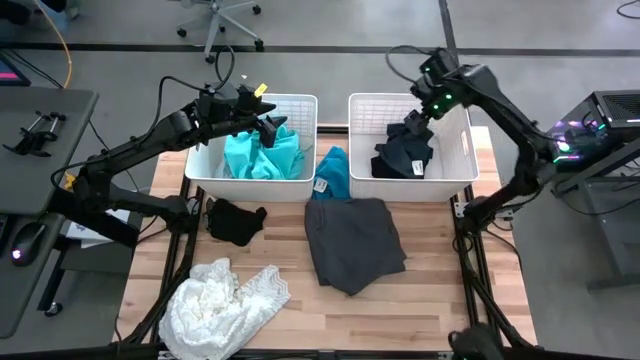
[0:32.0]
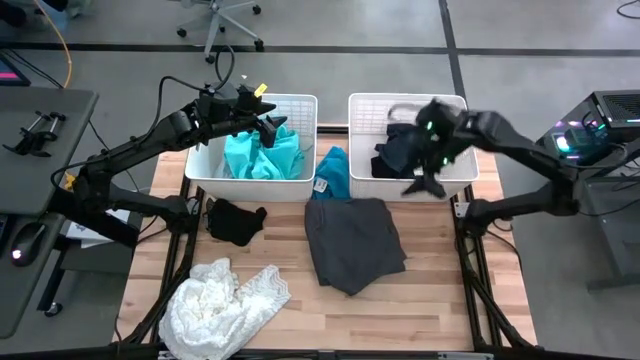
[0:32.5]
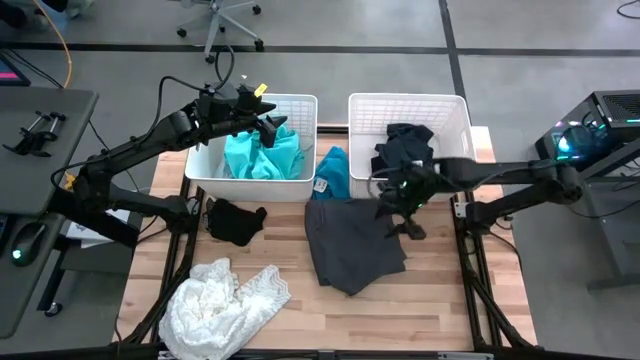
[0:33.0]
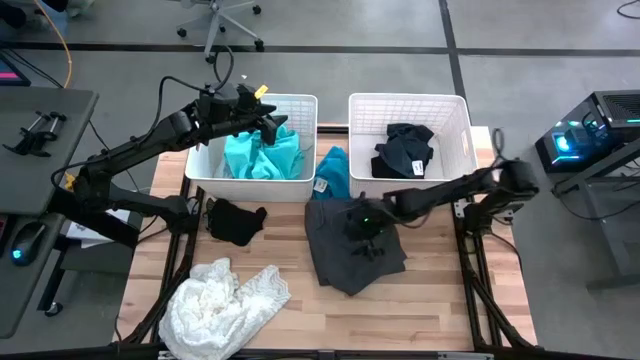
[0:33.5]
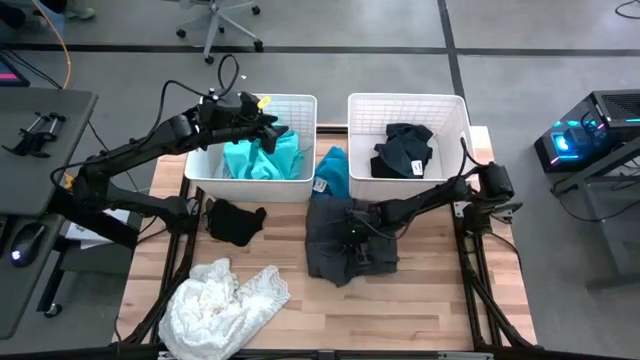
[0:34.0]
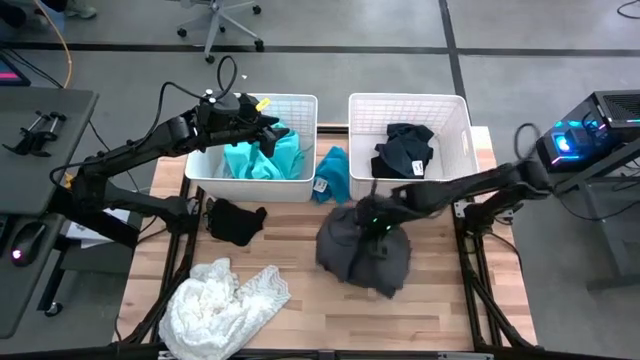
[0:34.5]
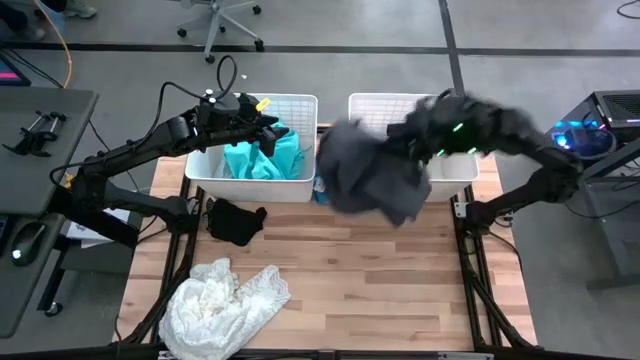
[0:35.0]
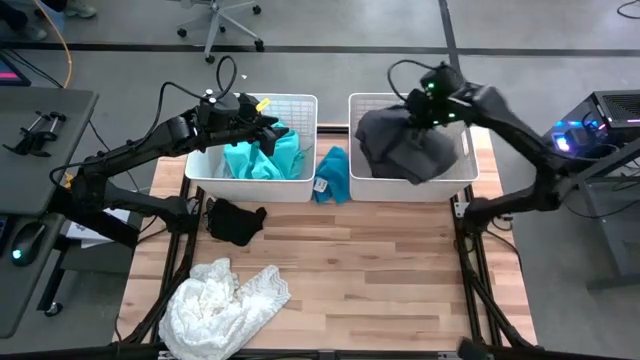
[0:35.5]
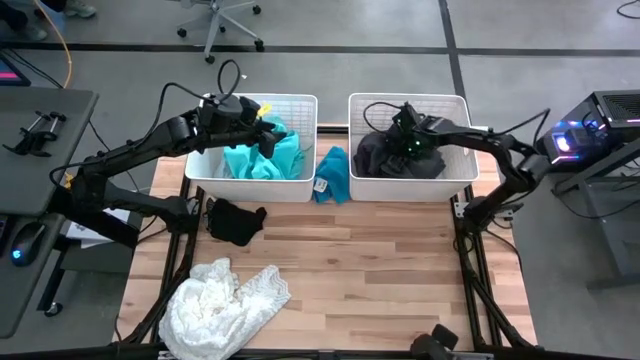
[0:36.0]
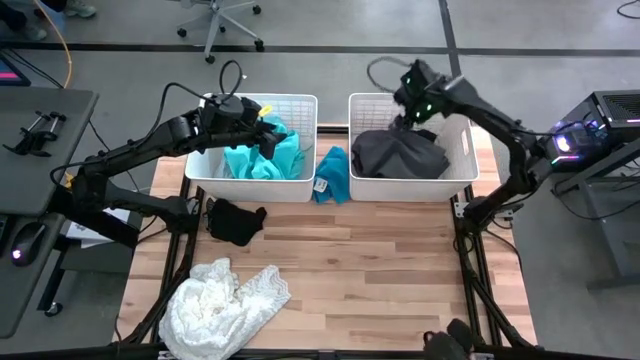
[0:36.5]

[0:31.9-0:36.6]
Task: Sort clothes
Put the gray shorts into the right white bin

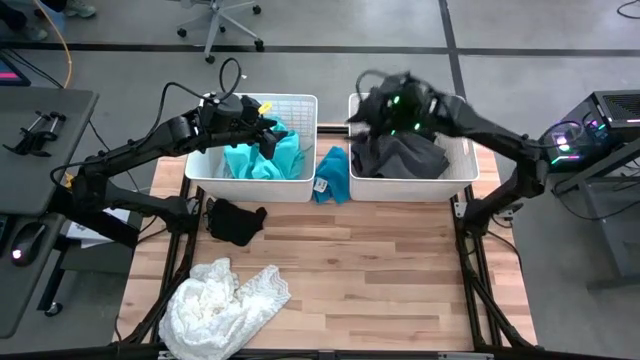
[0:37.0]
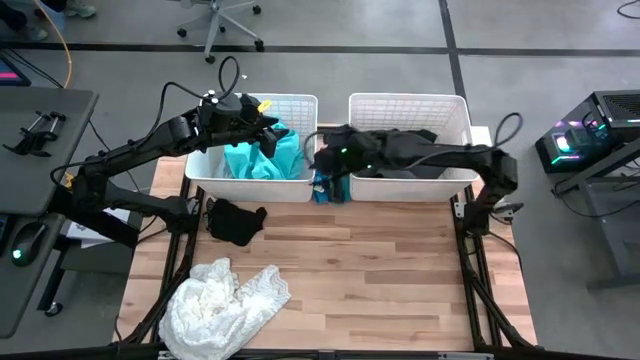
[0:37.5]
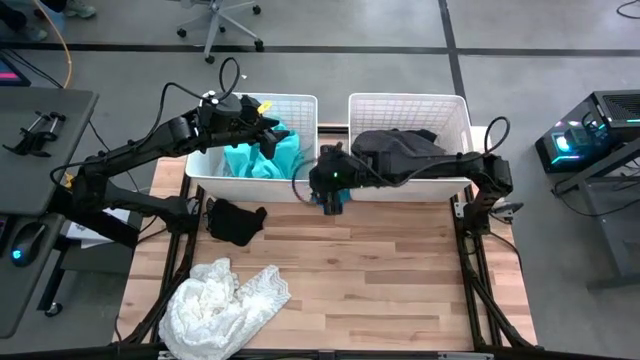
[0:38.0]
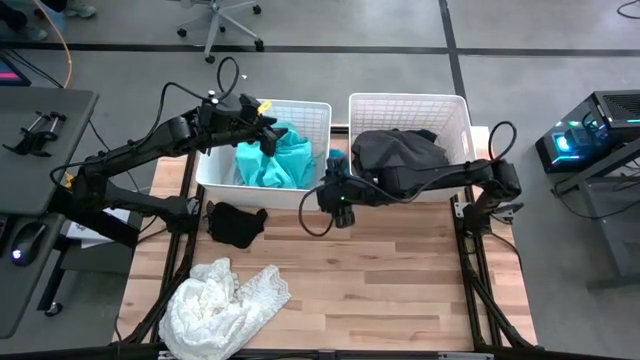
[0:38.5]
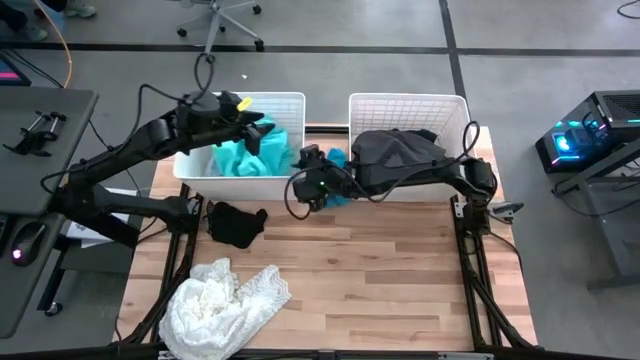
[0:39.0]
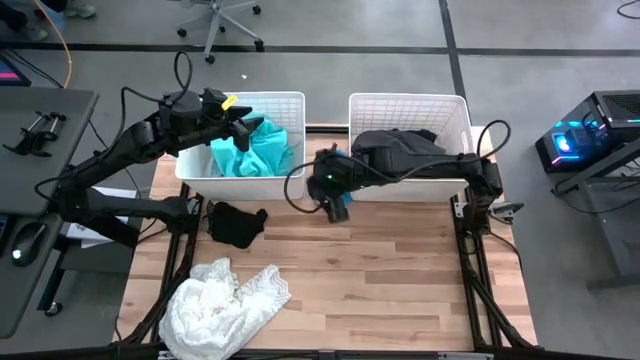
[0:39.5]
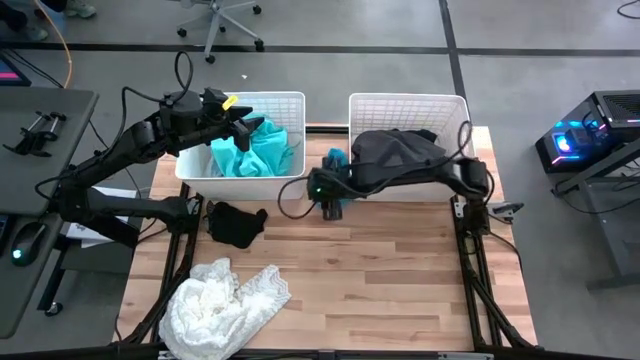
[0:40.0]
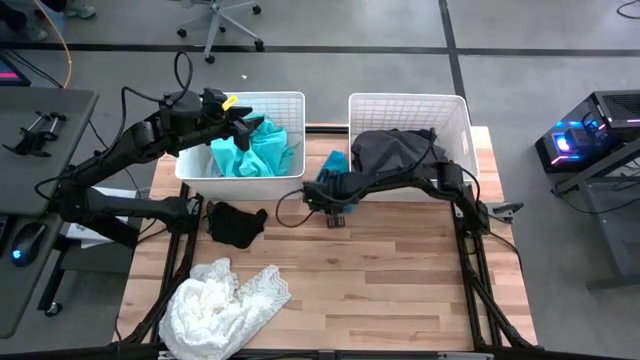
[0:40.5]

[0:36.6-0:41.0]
Put the blue underwear into the left white bin

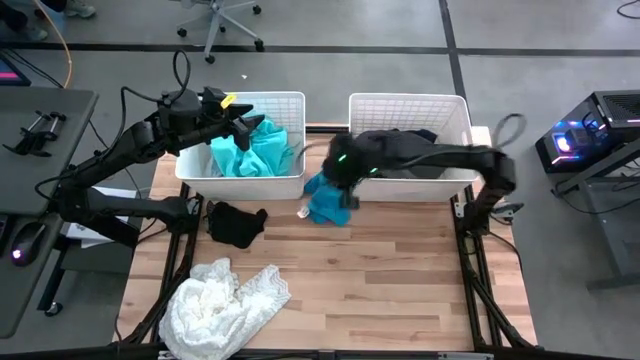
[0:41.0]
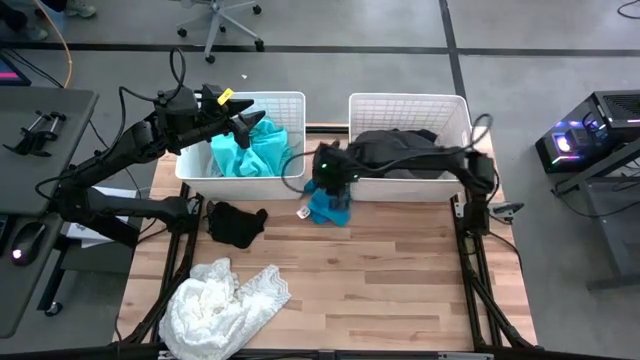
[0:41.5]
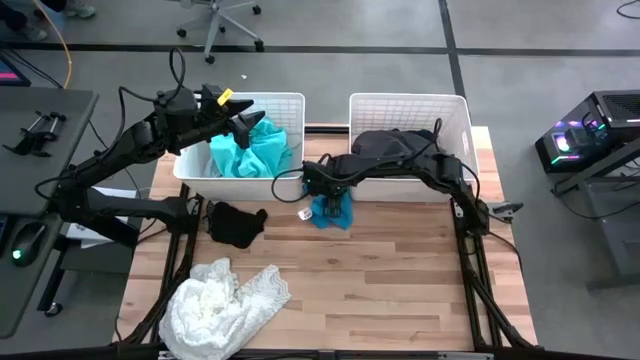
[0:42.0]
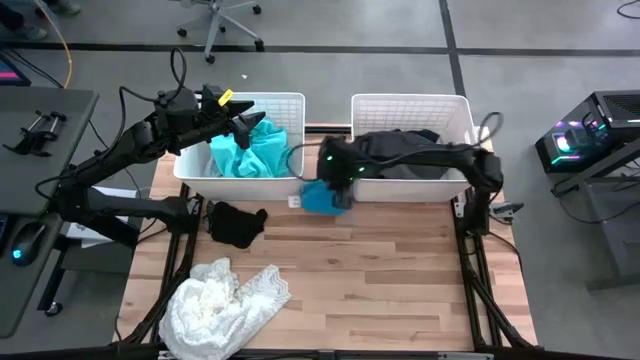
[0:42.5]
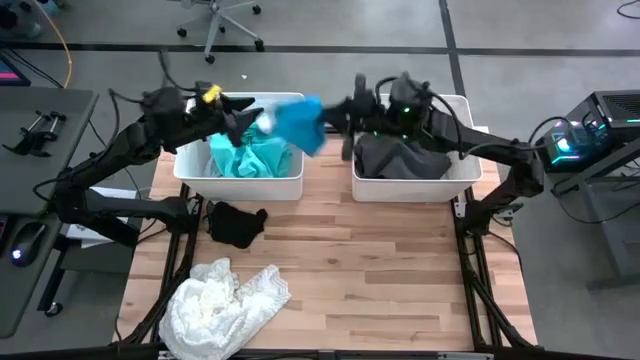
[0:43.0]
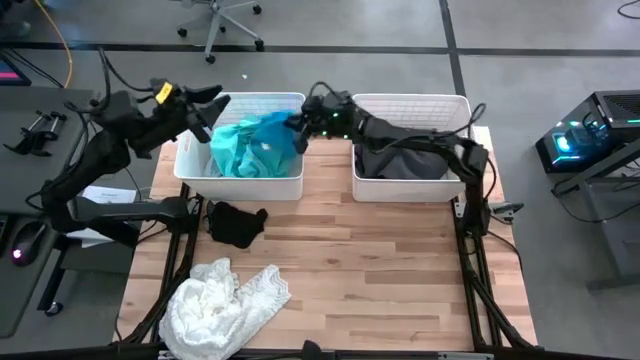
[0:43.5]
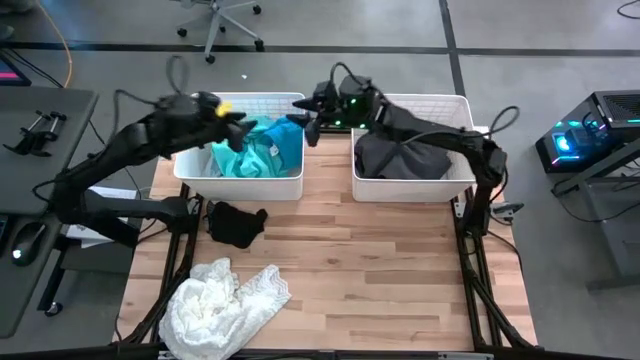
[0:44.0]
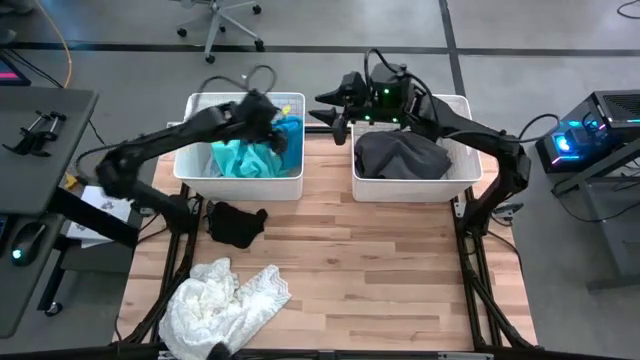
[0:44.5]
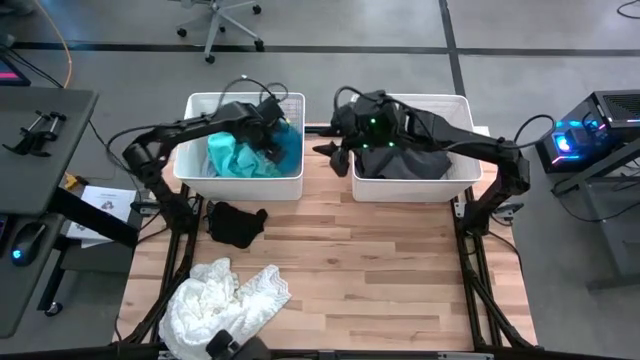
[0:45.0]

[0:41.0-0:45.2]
Put the blue underwear into the left white bin

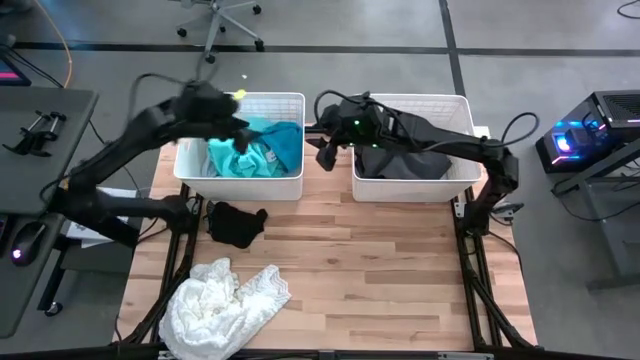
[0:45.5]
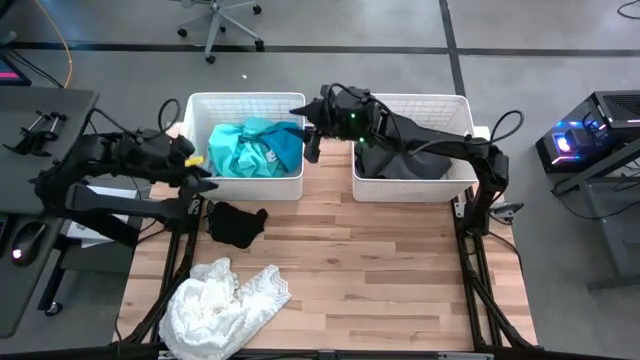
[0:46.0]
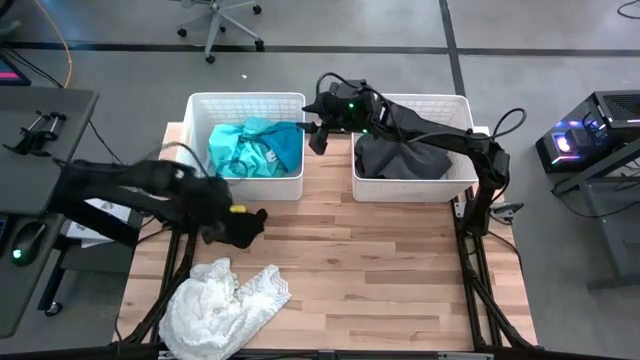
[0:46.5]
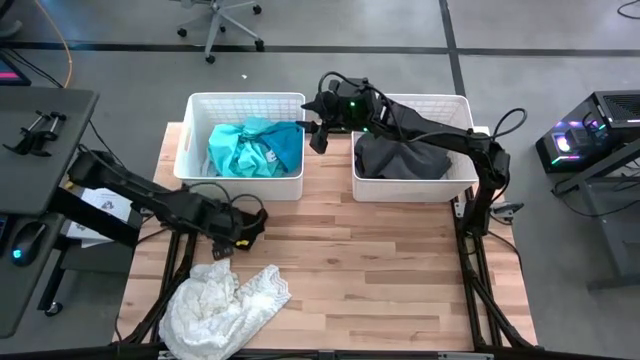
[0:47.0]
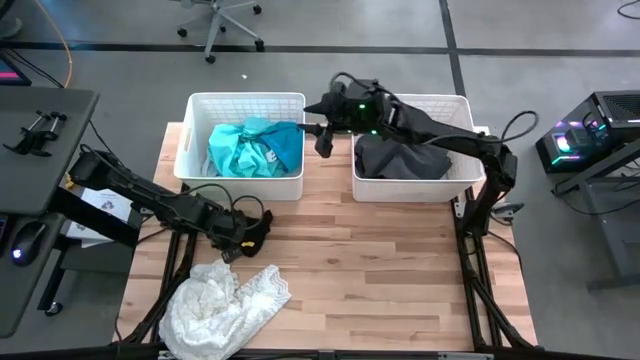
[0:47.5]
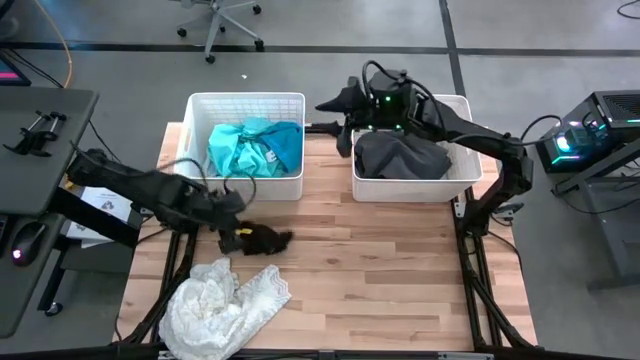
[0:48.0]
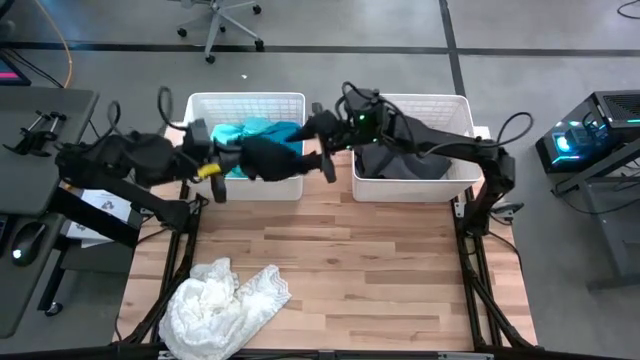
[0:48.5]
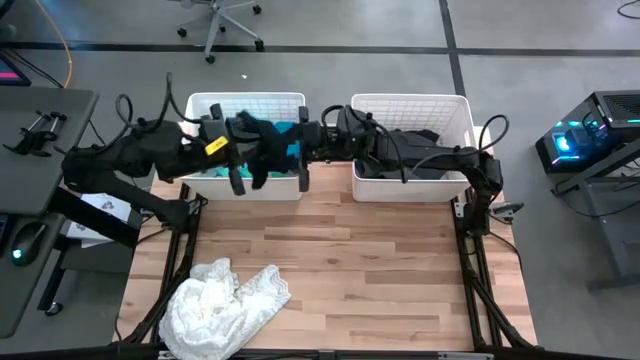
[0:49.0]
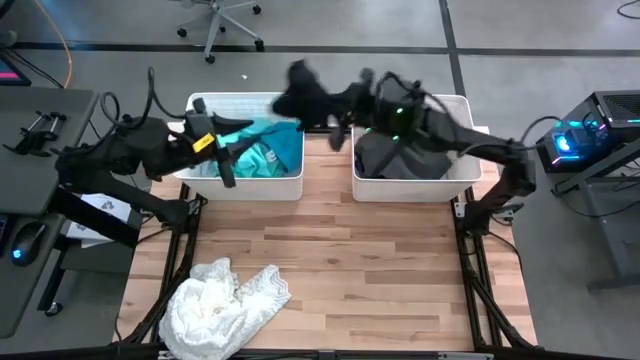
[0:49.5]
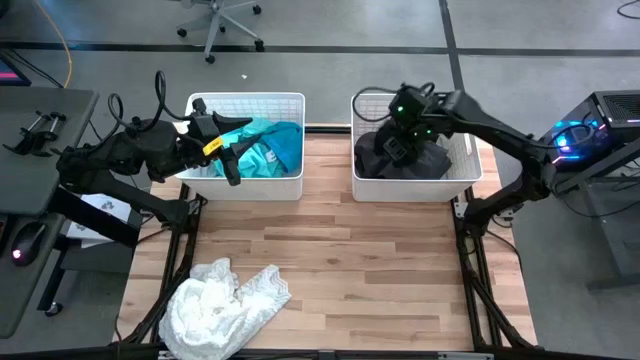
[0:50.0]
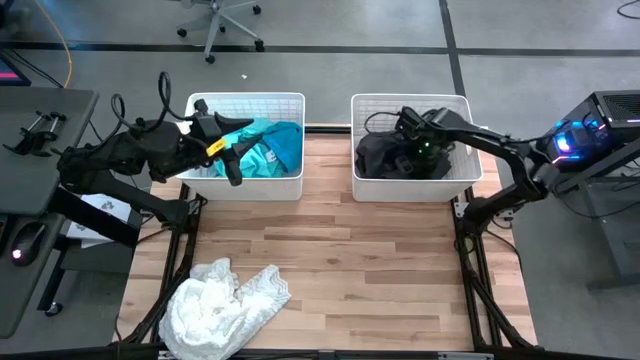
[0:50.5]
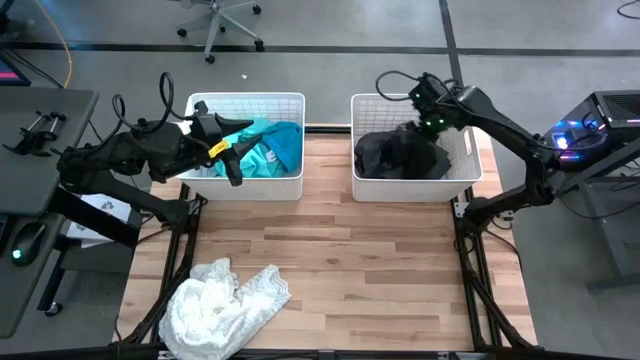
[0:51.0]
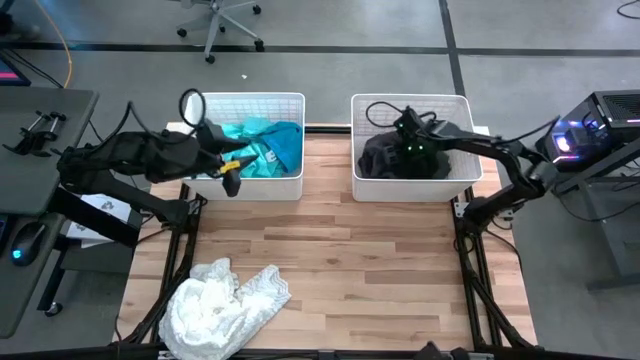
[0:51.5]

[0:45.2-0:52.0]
Put the black underwear into the right white bin

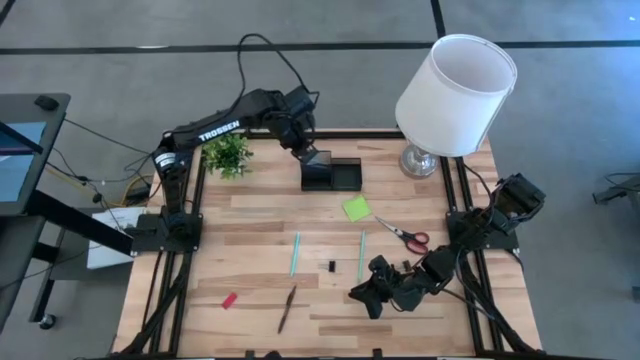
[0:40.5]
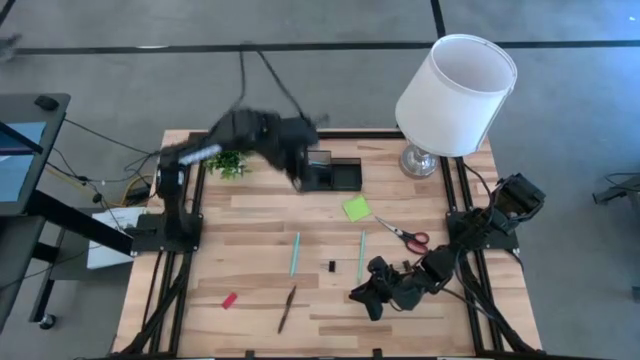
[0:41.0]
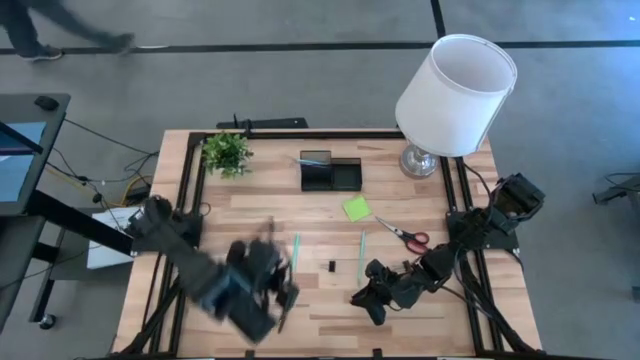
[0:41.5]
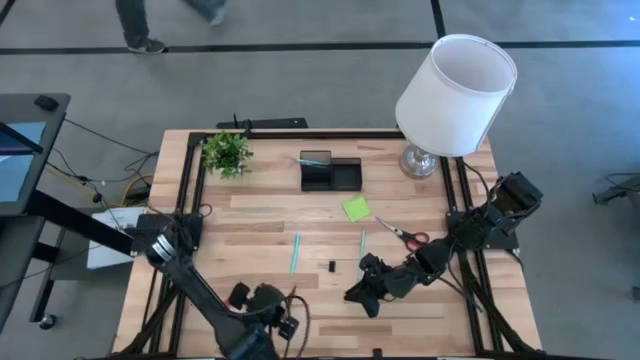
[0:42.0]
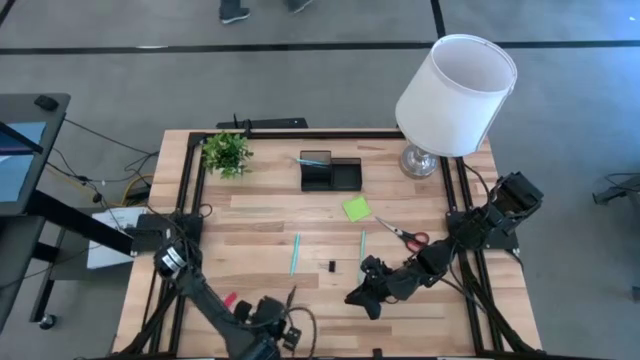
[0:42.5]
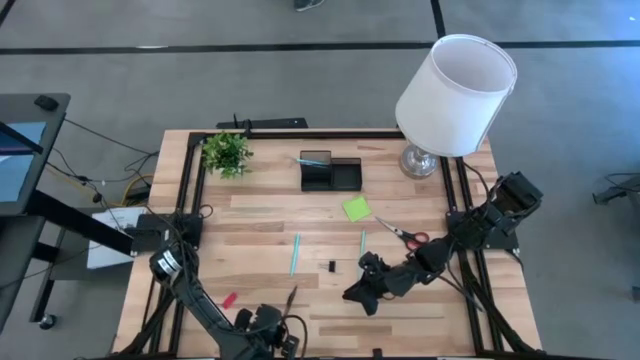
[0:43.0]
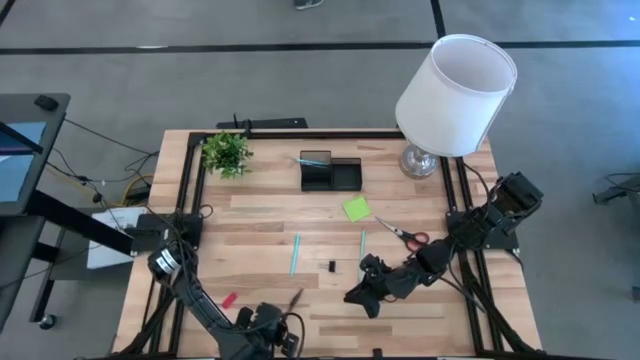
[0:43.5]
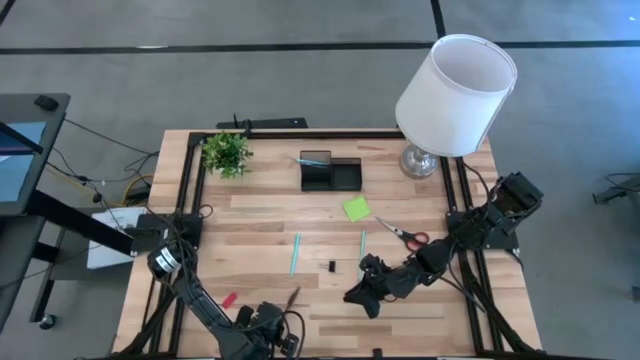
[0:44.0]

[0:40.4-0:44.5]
Task: Pick and place office supplies into organizer
Put the brown pen into the black desk organizer
